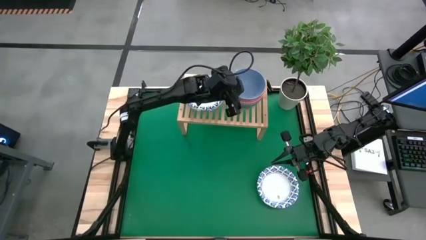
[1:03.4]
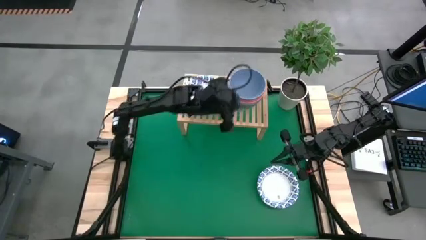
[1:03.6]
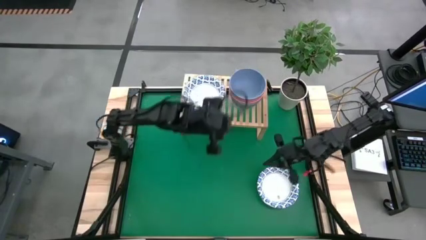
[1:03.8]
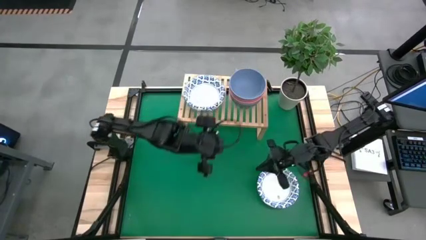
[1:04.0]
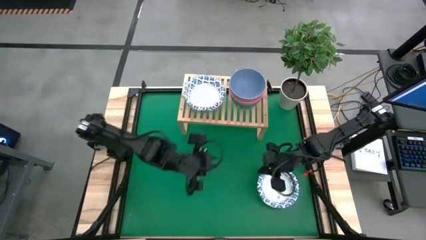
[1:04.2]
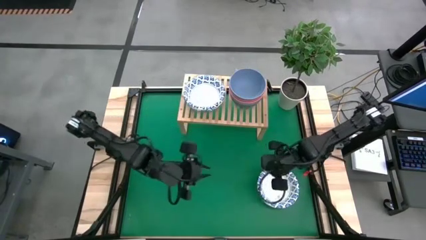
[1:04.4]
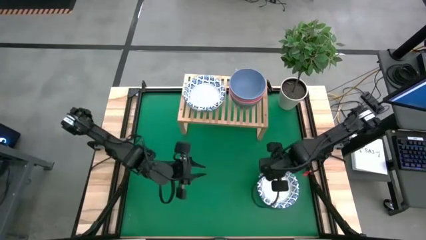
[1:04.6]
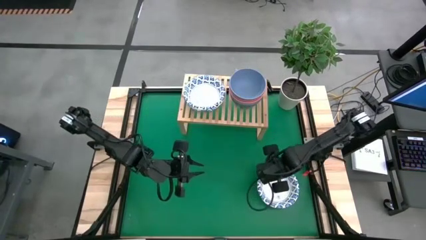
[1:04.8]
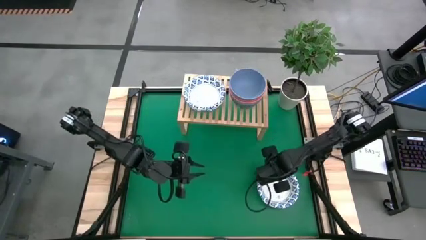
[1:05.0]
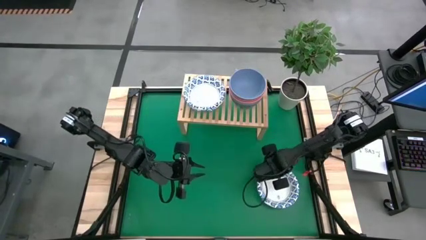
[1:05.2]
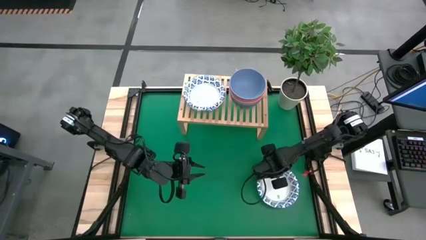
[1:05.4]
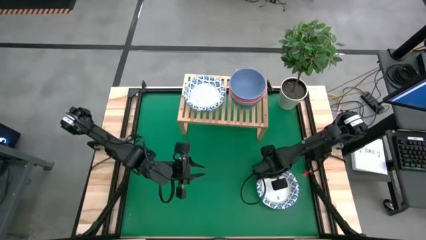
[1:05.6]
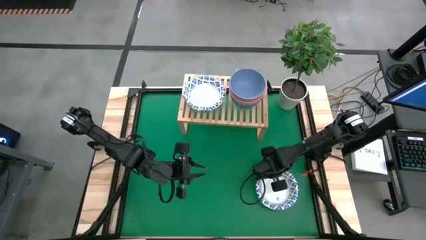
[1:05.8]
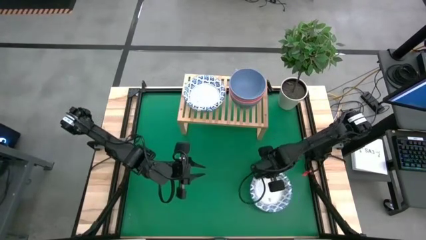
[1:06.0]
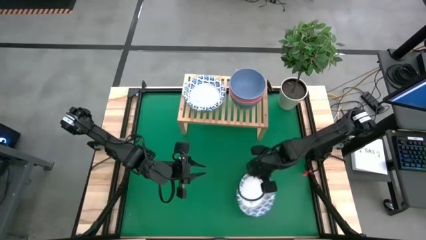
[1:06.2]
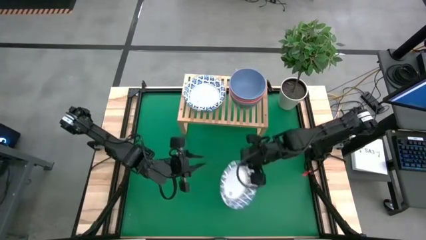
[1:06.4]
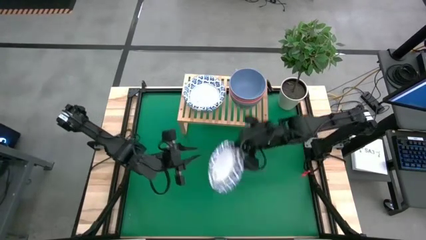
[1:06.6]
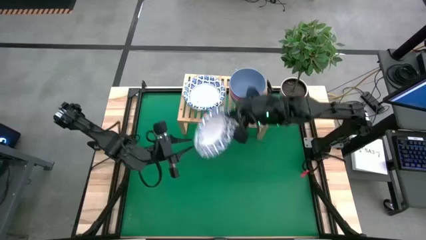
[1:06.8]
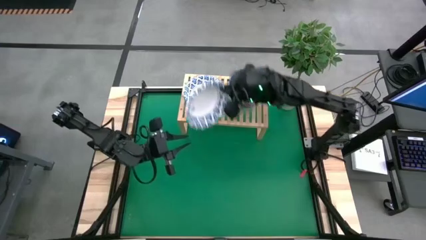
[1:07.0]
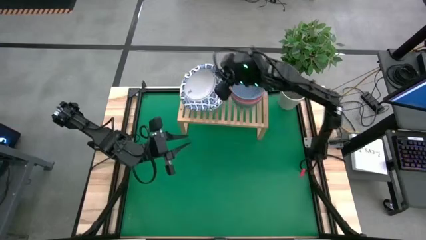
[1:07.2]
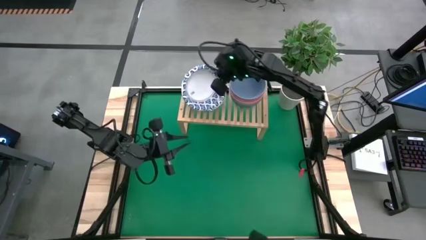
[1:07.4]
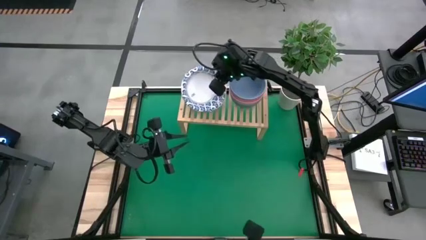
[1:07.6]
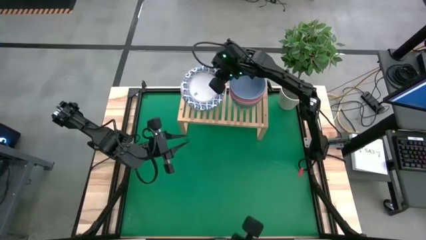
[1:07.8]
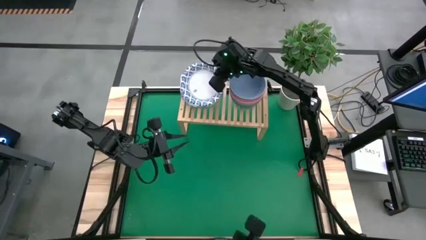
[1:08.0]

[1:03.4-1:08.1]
Task: Place and stack bowls onto a shelf
Stack the white patterned bowl on top of the white patterned bowls on the shelf

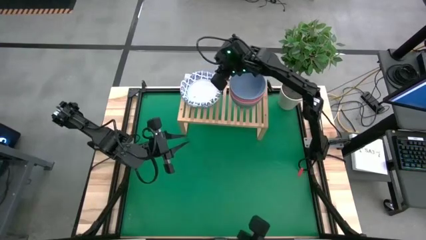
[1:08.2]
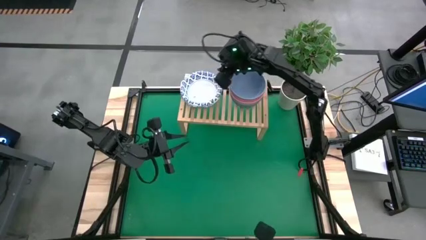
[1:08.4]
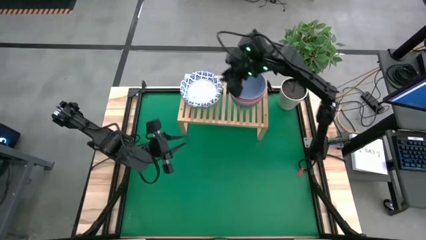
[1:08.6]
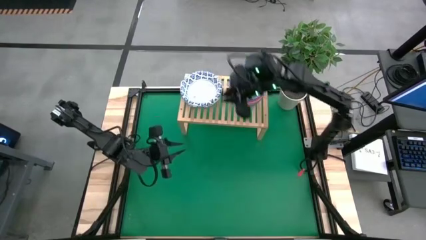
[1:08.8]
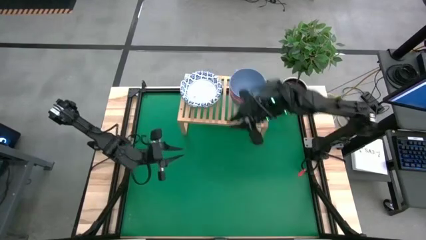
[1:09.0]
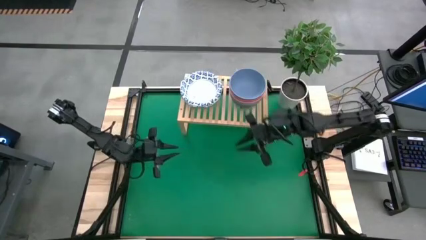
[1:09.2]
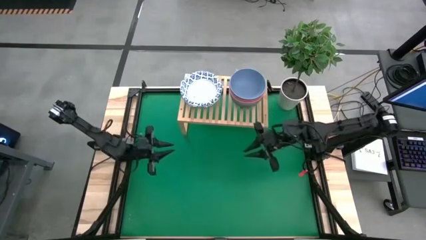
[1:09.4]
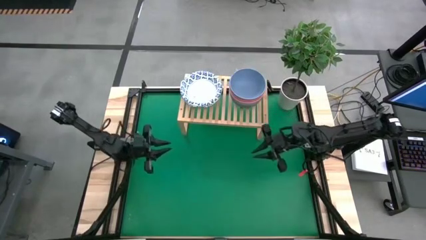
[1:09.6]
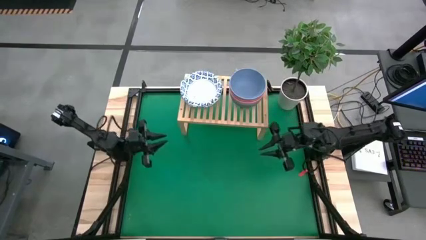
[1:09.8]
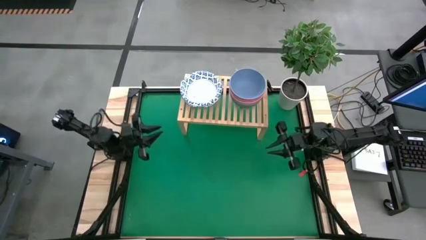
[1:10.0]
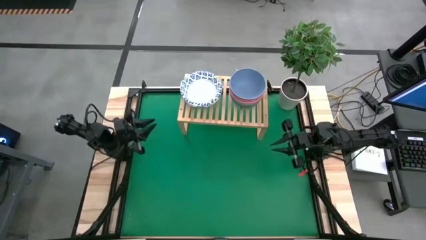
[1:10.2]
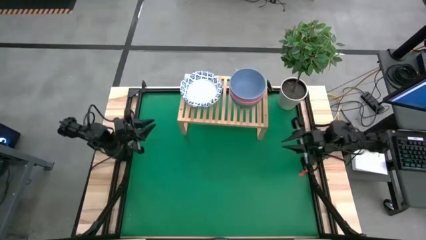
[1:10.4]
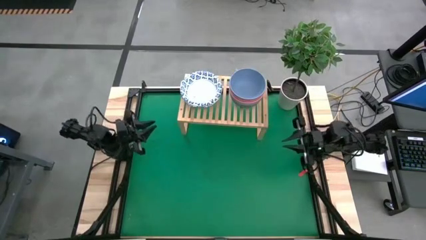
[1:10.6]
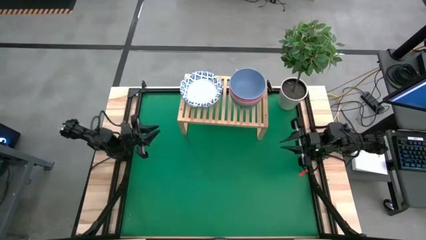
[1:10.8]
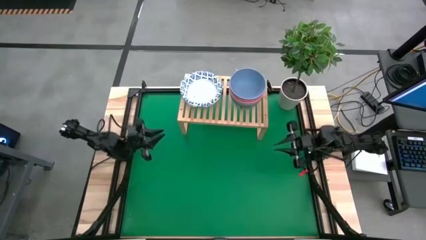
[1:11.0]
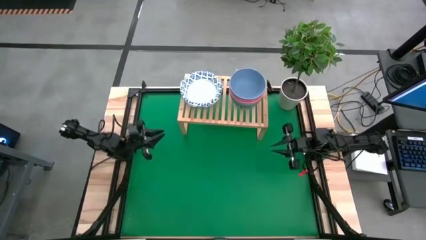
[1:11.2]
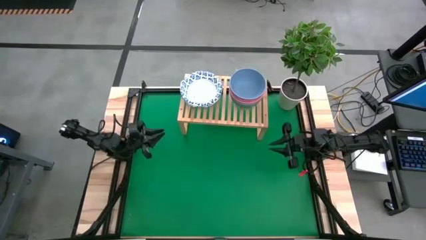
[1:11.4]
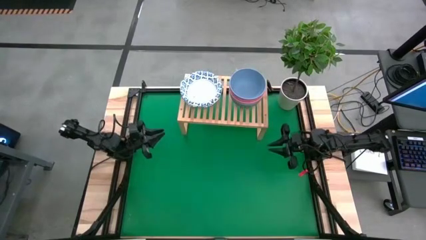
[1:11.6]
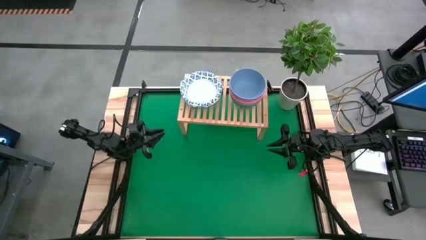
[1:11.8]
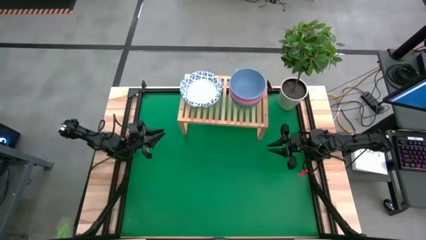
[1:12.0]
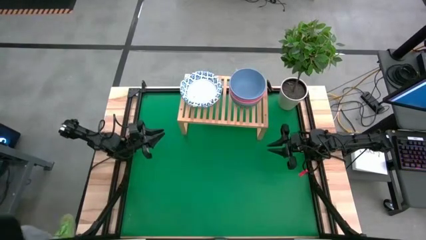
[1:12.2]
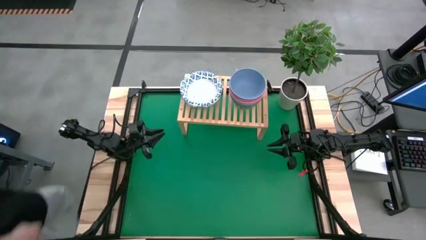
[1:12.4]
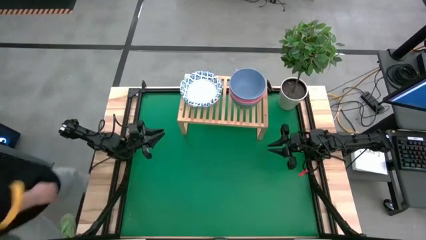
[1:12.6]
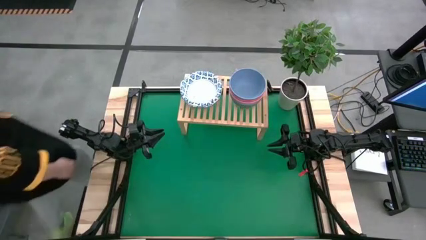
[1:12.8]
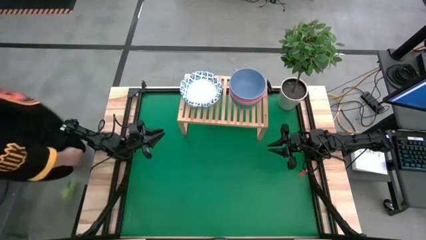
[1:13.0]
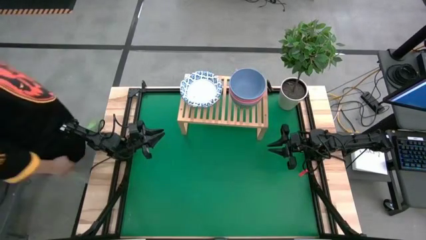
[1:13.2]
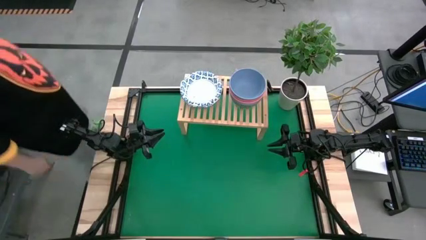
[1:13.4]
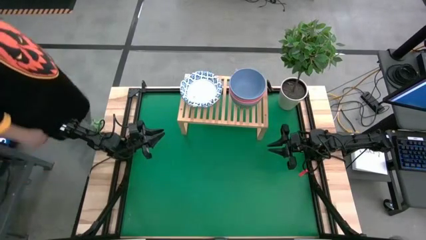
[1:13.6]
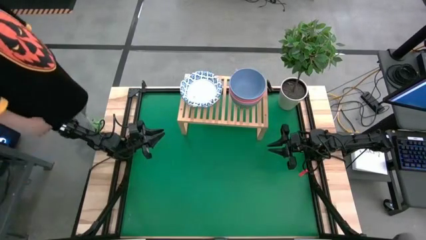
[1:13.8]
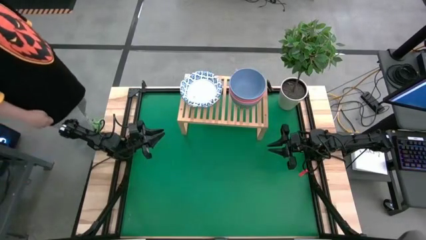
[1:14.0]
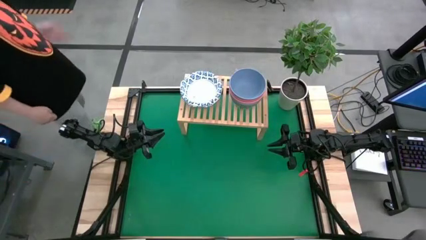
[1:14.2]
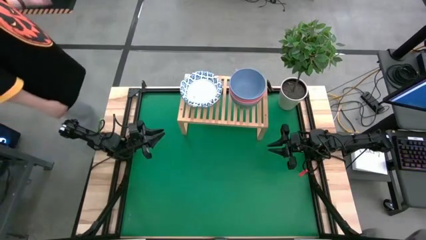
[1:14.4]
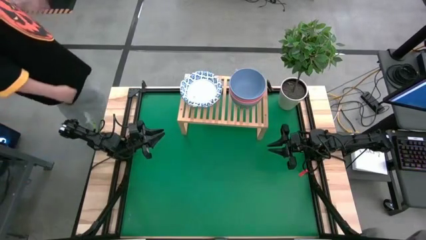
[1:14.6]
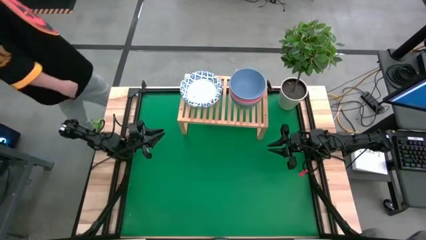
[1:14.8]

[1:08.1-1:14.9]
Return to Home Position

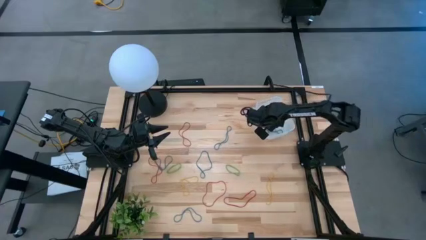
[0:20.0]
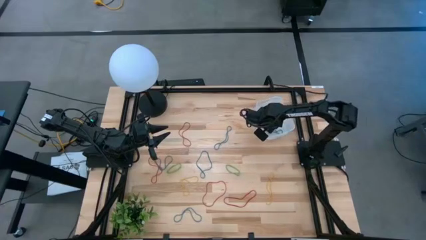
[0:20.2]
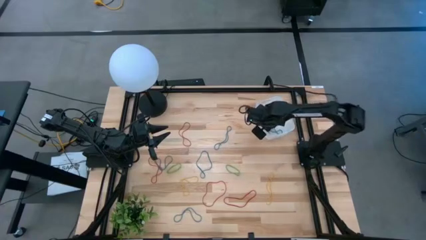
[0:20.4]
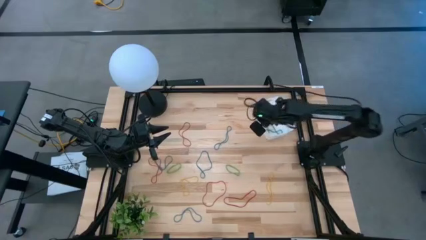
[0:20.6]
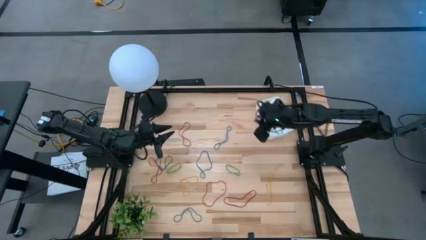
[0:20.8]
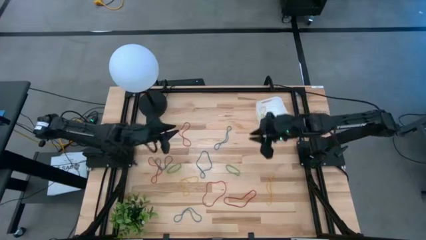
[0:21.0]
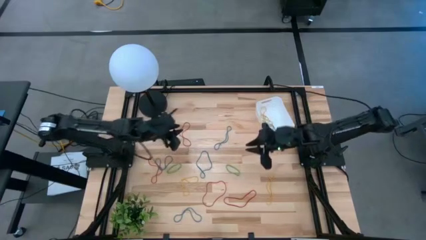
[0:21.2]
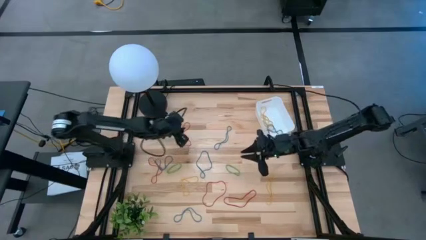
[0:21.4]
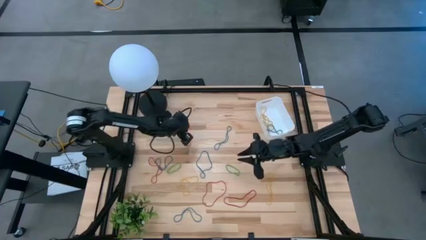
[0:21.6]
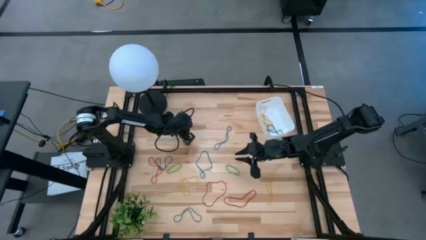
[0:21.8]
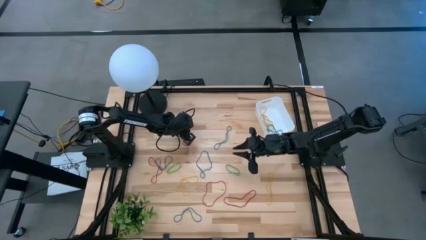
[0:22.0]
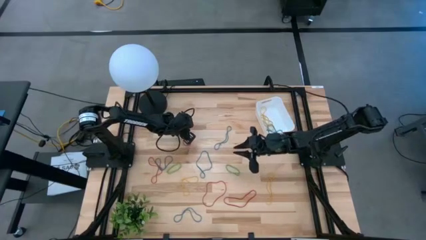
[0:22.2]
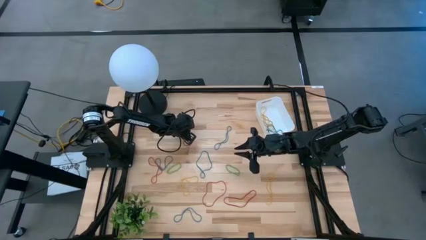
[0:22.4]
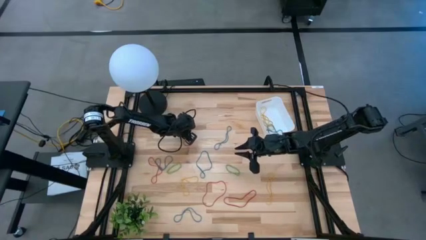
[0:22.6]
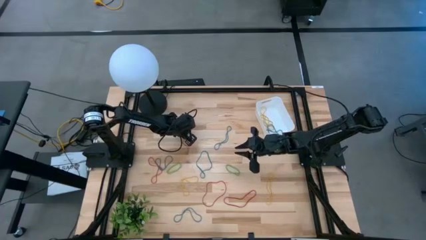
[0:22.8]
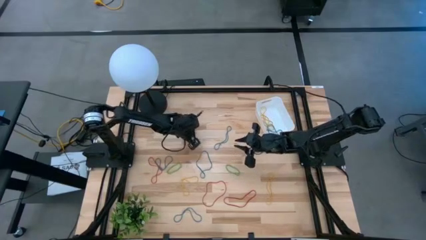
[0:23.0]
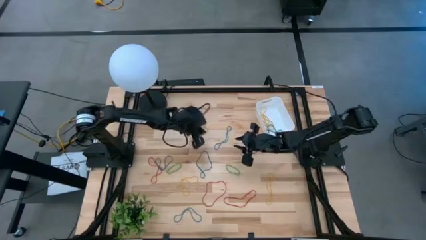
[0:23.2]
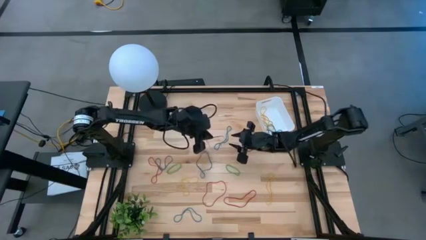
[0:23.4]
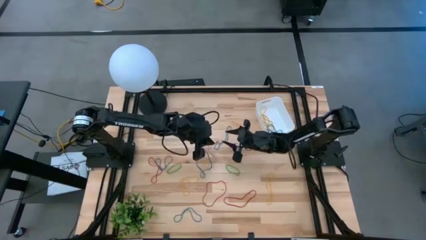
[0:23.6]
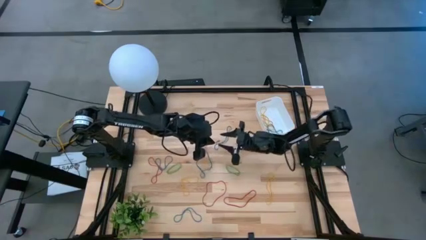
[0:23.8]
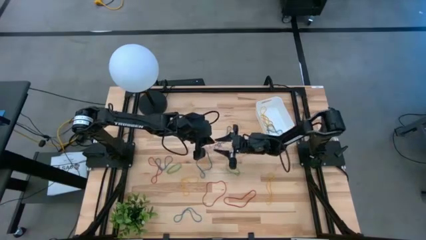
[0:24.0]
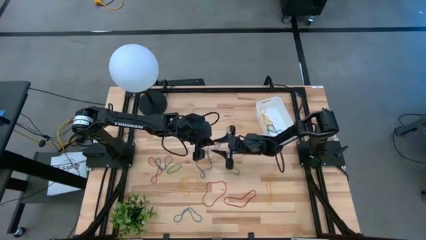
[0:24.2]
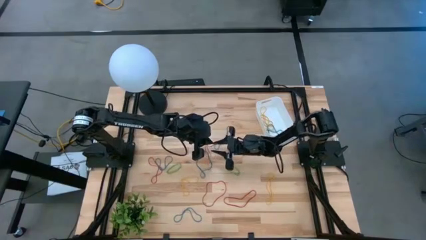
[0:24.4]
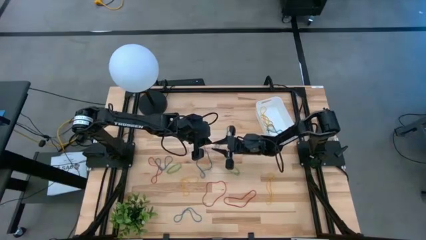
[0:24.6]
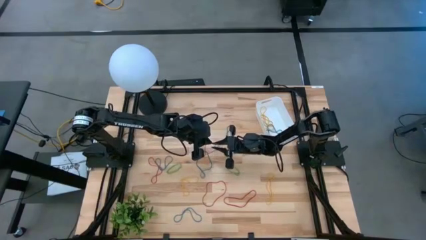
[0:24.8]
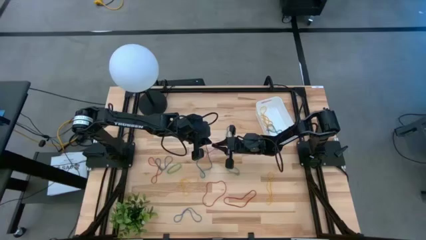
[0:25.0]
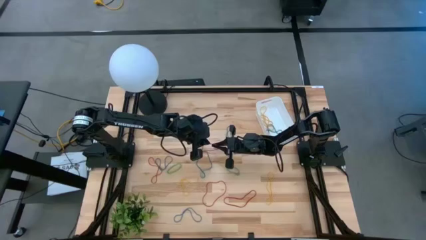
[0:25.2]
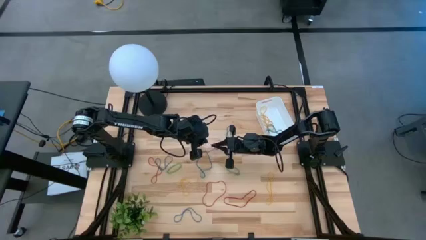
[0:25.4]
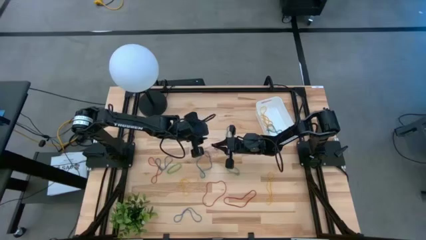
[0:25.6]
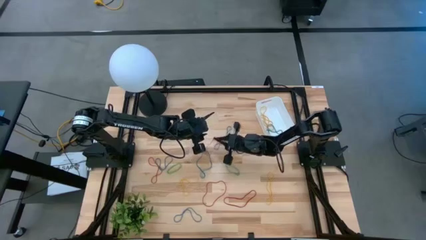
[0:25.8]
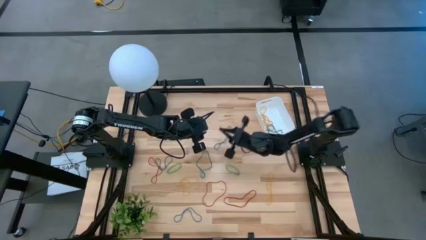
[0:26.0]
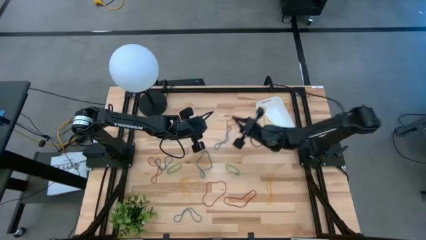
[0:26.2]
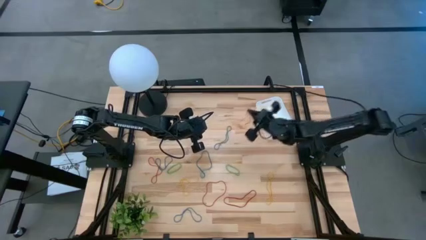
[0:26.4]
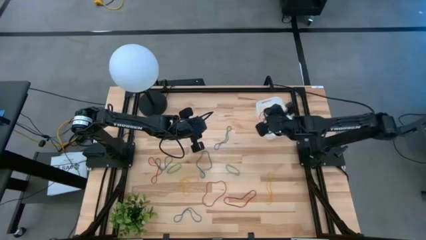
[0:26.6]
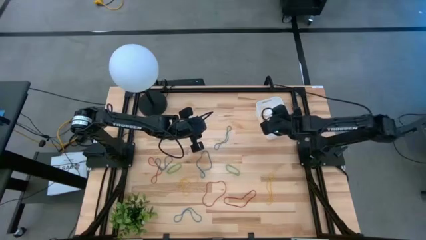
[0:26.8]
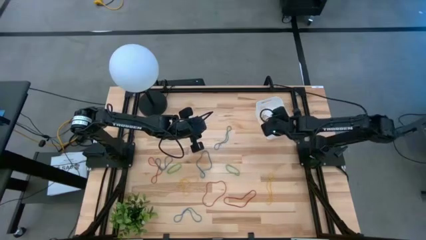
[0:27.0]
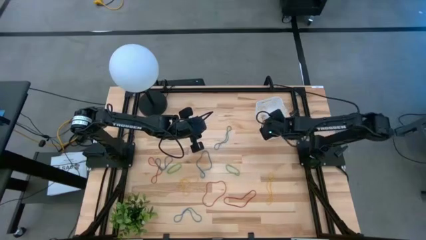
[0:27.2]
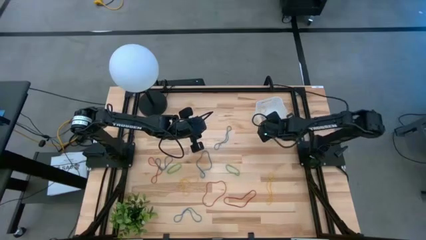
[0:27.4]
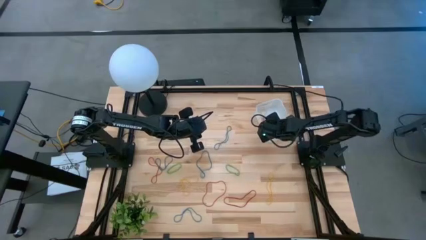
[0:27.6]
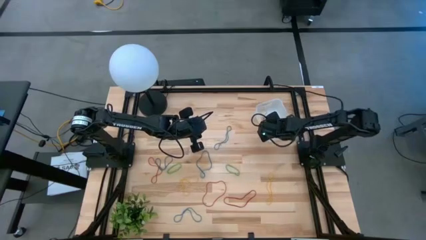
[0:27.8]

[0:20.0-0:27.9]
Task: Pick and place items into bin
Put the red rubber band into the white bin
